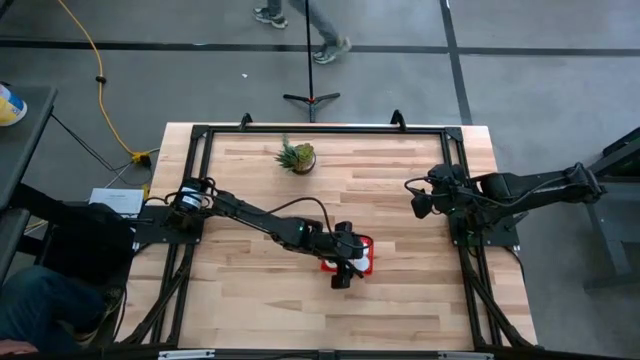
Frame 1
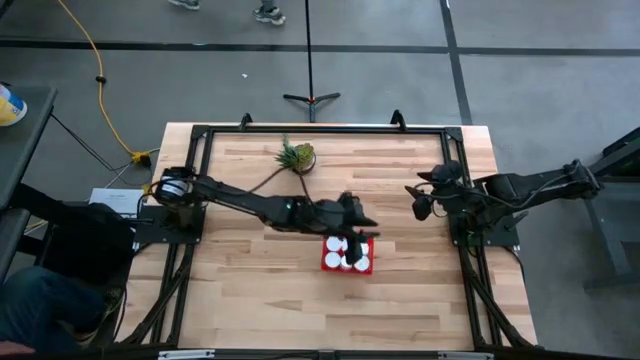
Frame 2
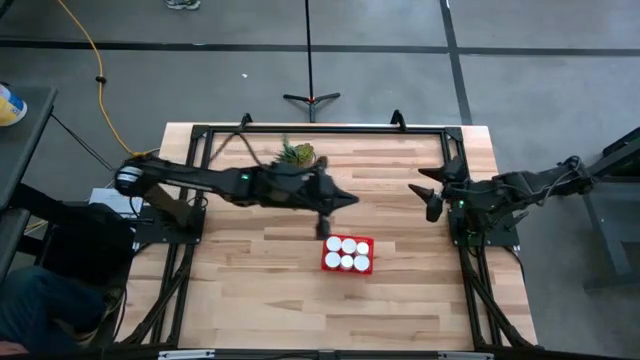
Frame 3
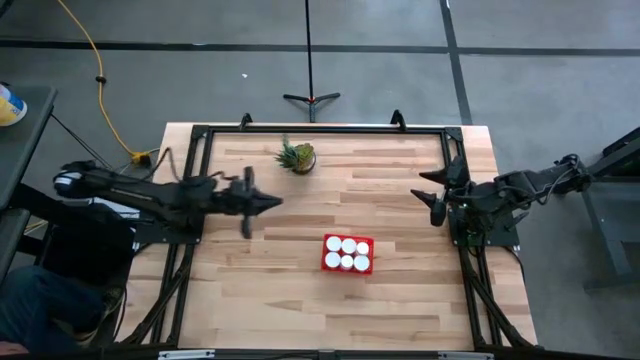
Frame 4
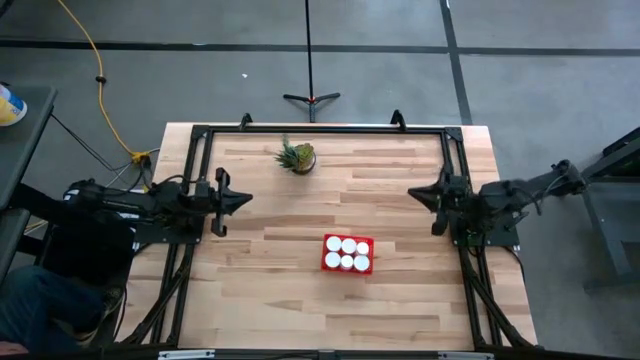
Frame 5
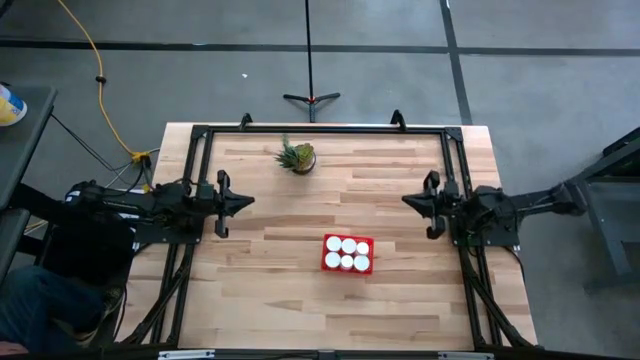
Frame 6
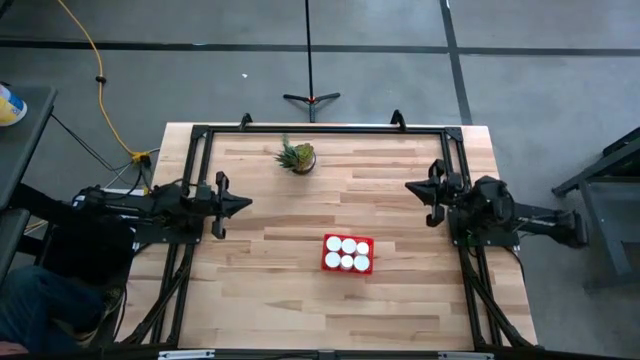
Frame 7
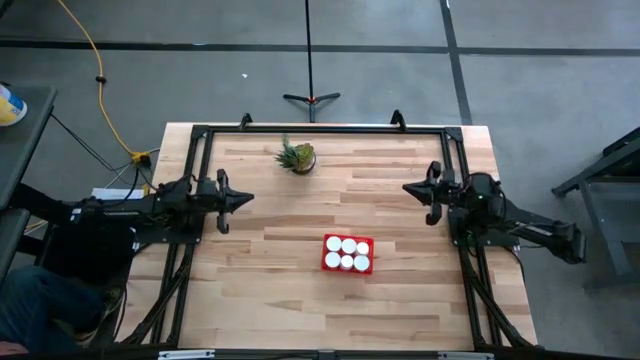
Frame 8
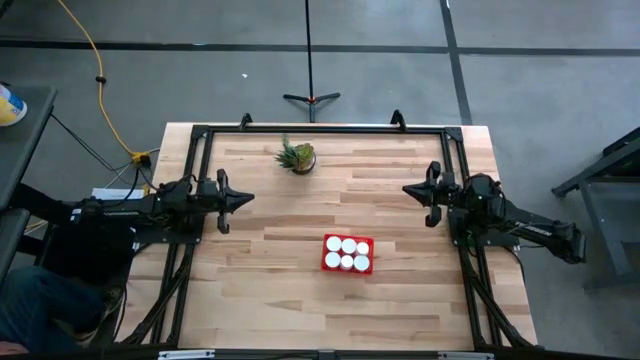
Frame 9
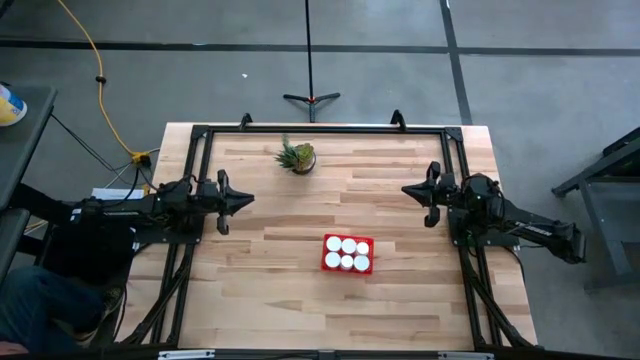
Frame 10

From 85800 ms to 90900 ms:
Task: Pick and place pill bottles into a basket
Return to Home Position

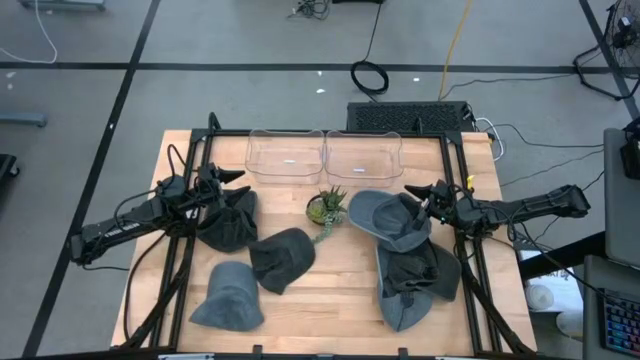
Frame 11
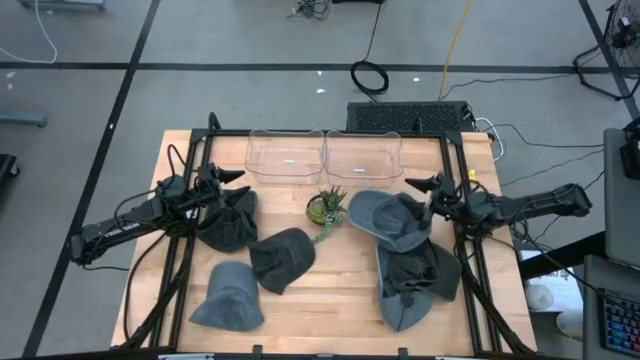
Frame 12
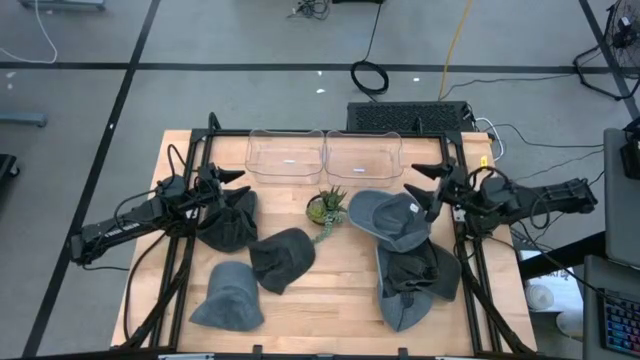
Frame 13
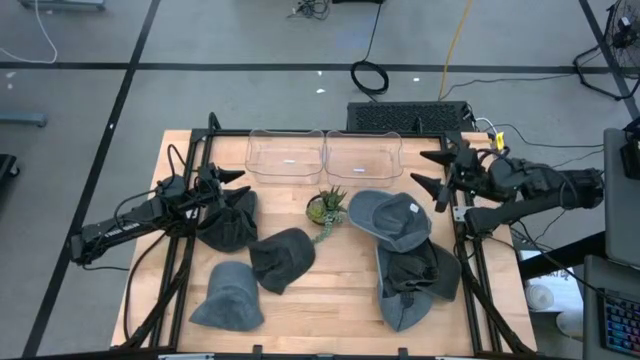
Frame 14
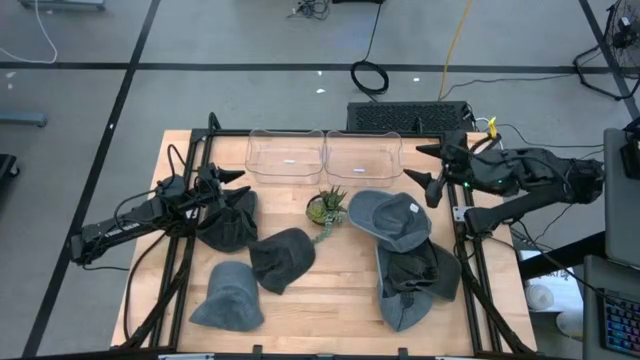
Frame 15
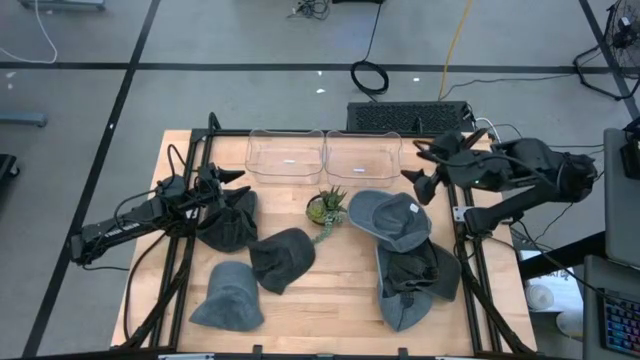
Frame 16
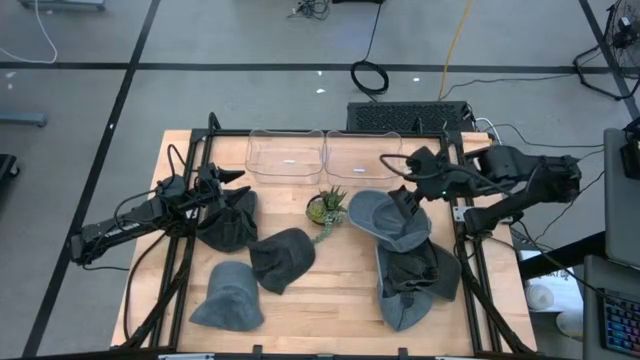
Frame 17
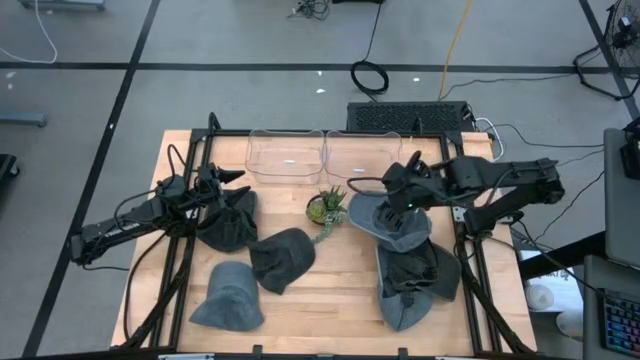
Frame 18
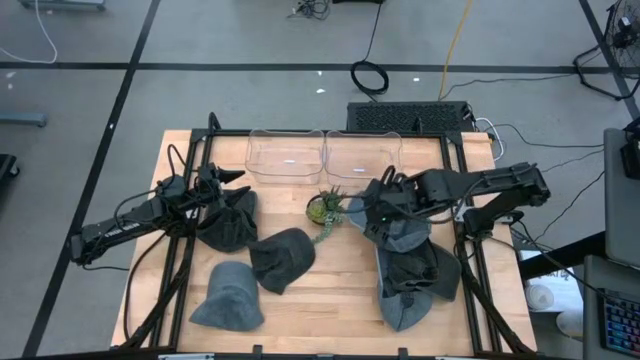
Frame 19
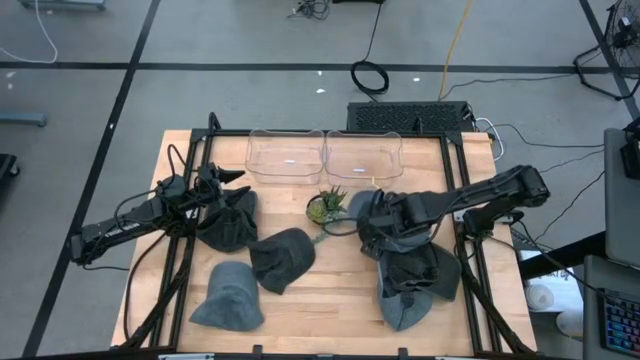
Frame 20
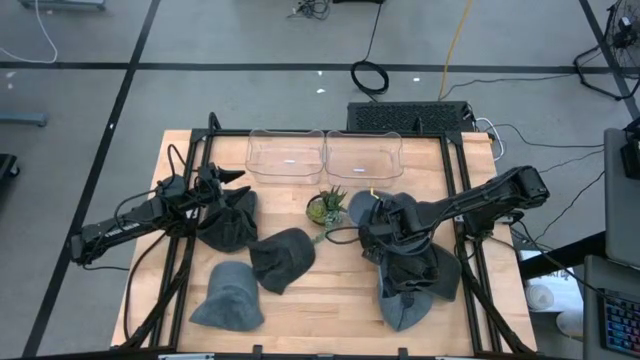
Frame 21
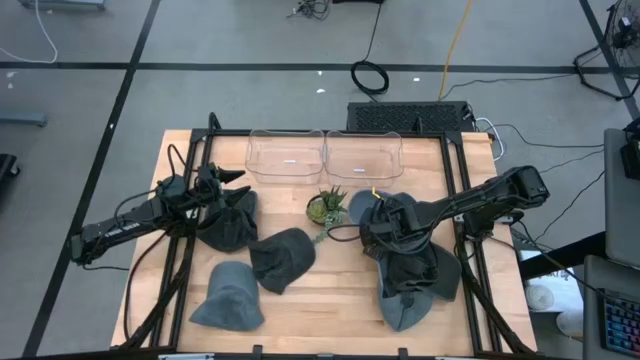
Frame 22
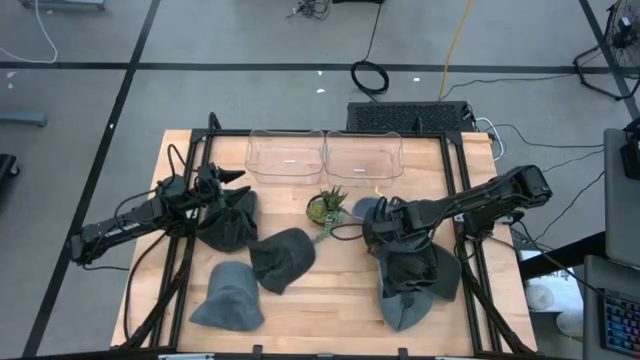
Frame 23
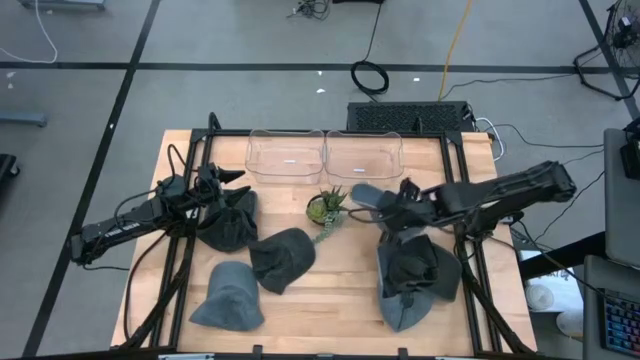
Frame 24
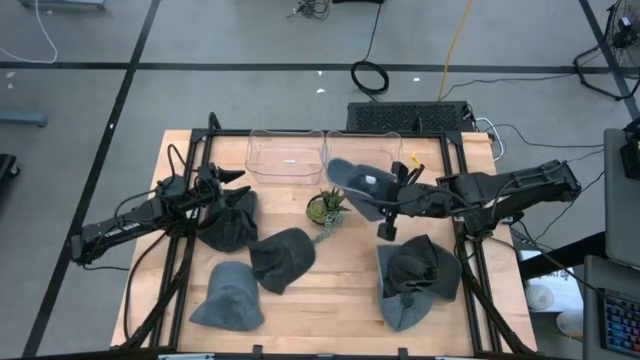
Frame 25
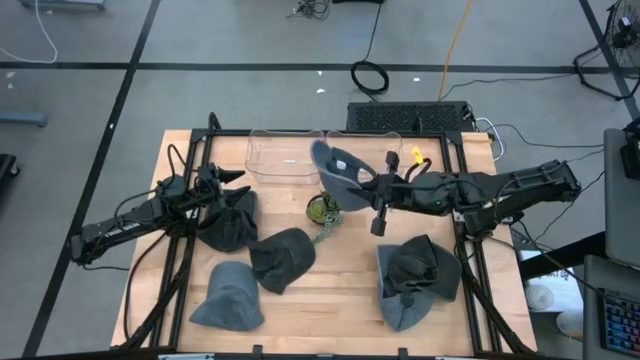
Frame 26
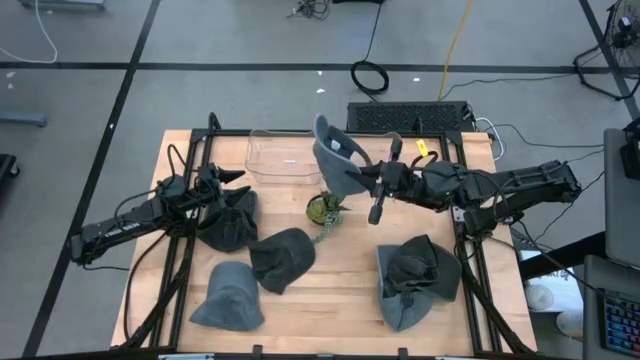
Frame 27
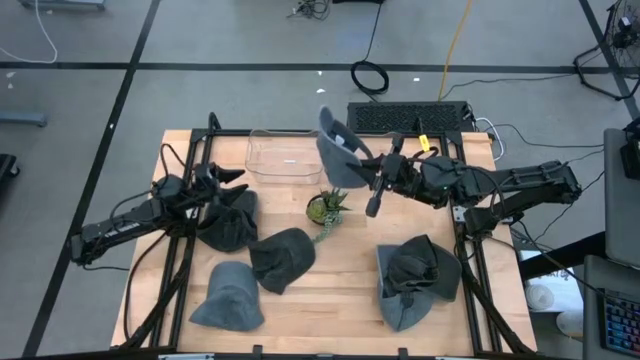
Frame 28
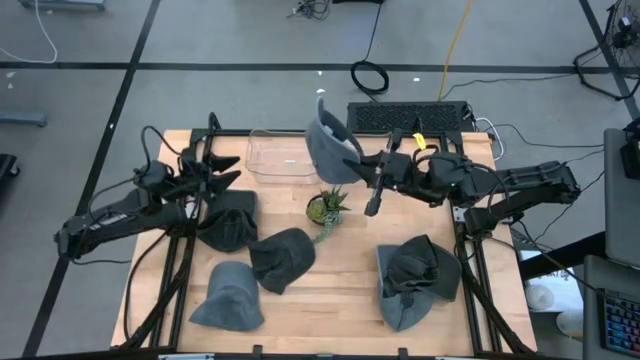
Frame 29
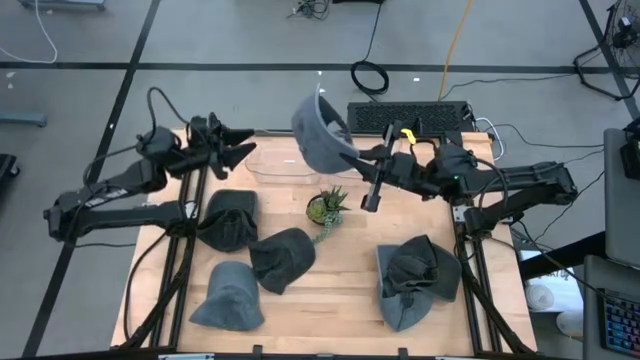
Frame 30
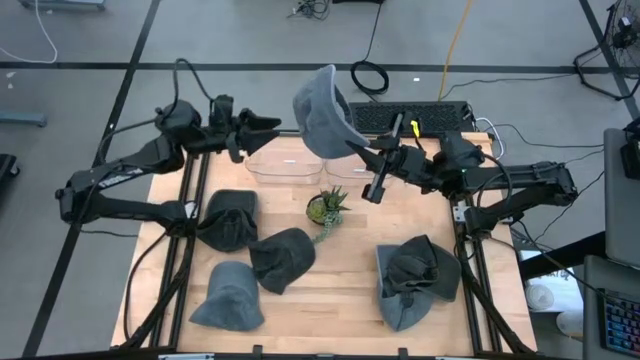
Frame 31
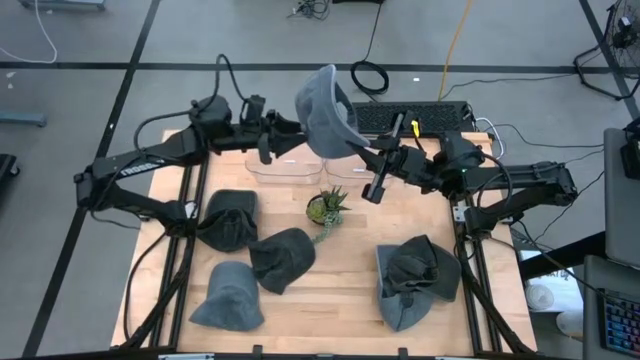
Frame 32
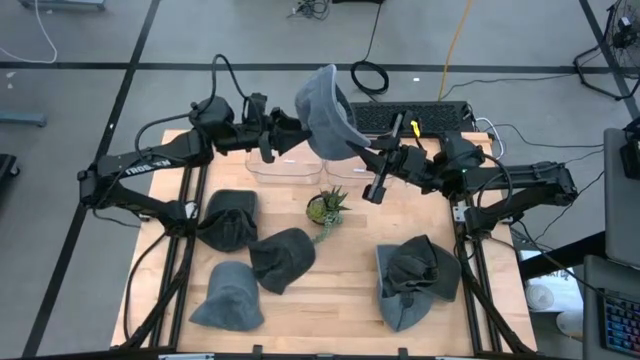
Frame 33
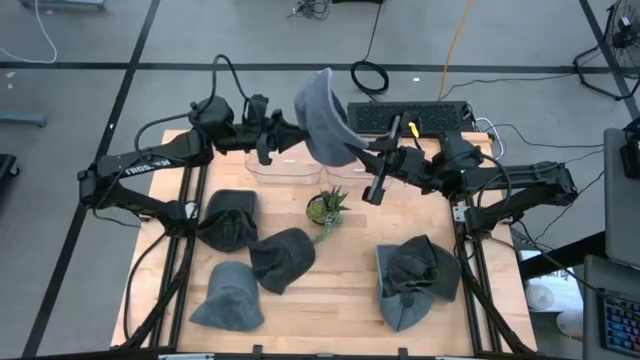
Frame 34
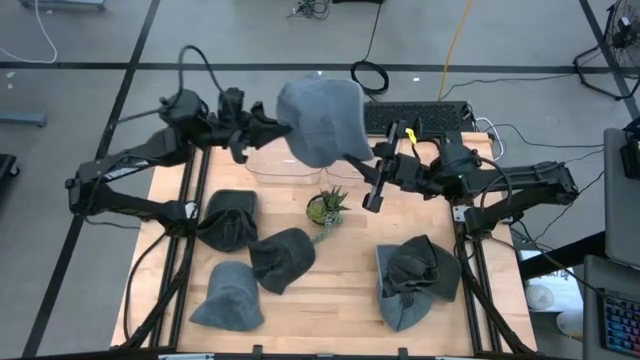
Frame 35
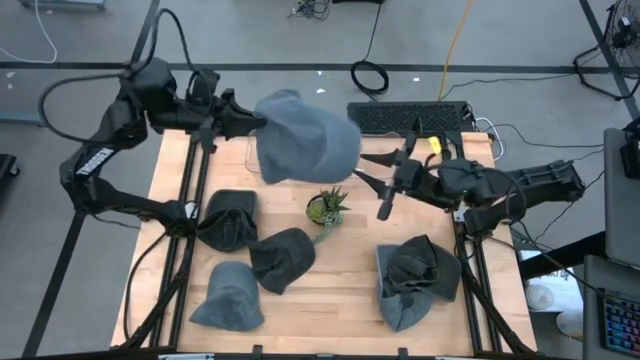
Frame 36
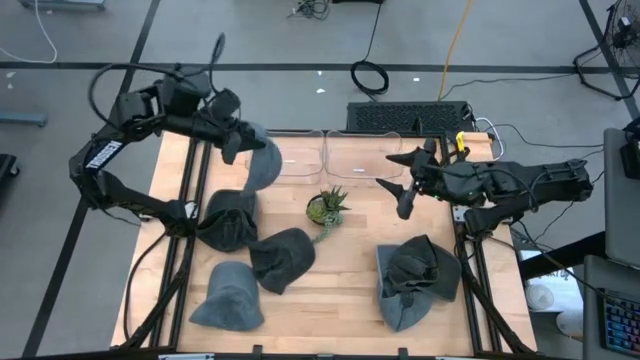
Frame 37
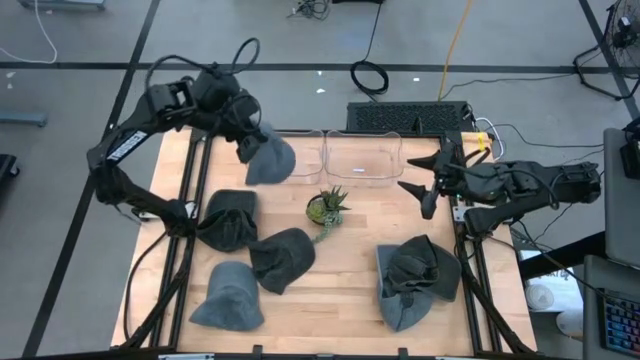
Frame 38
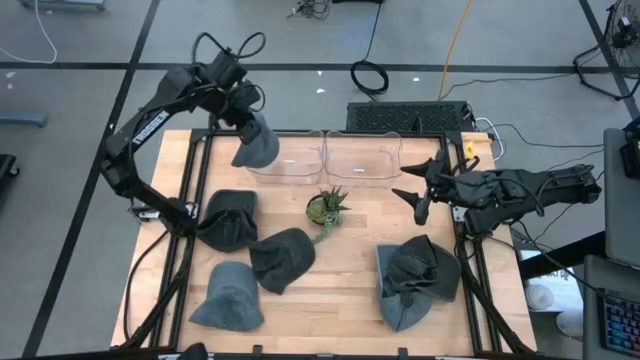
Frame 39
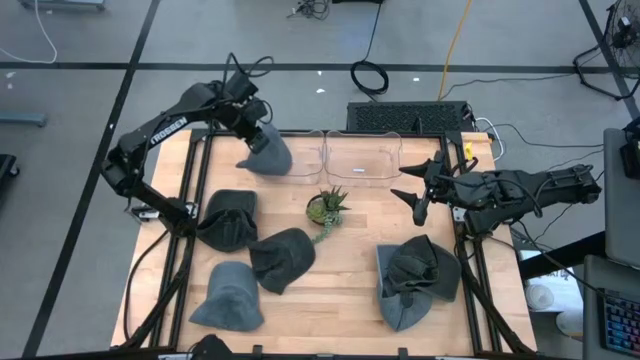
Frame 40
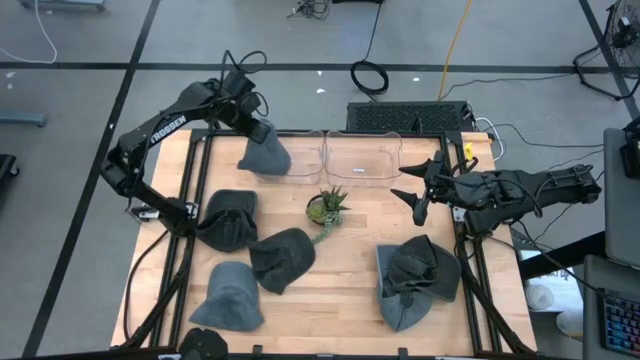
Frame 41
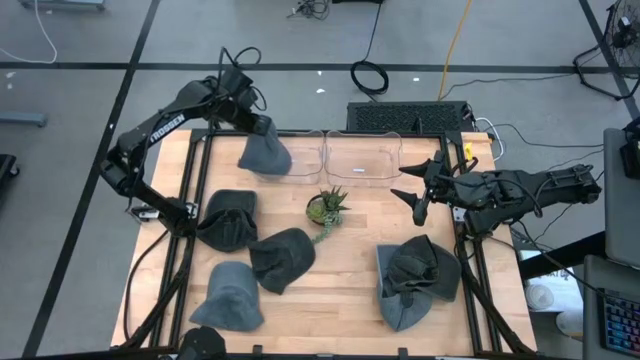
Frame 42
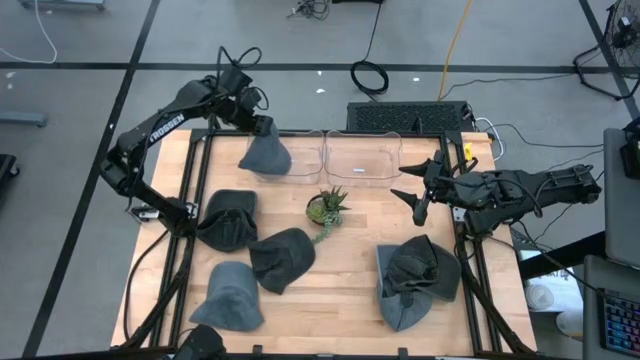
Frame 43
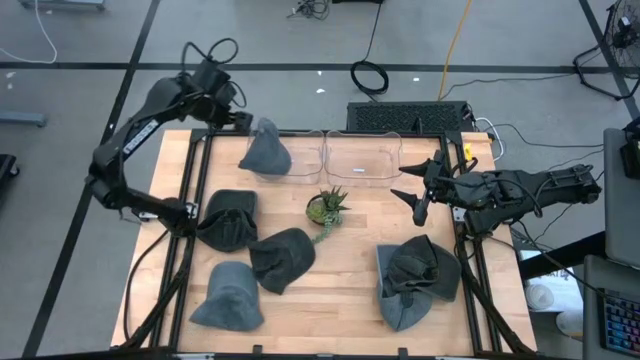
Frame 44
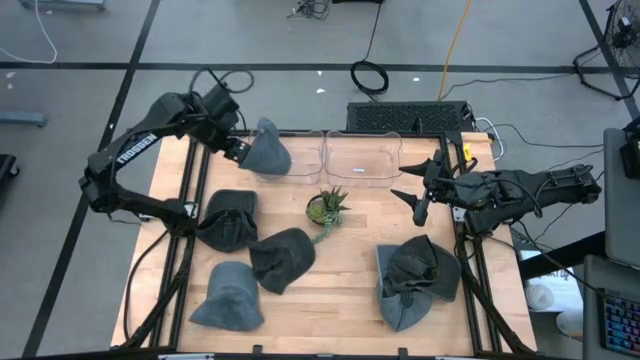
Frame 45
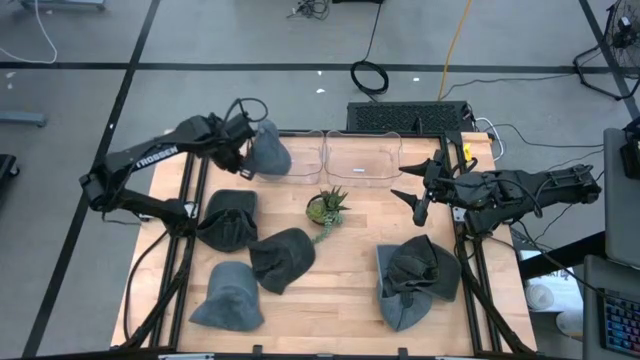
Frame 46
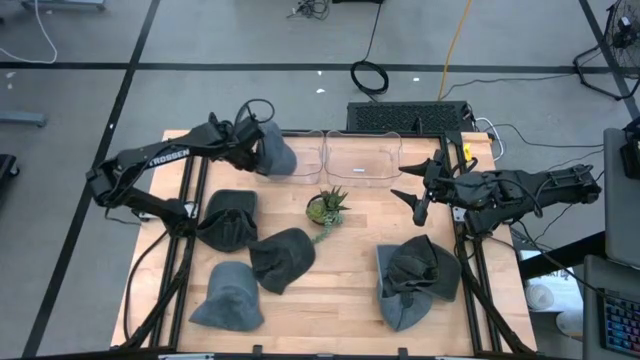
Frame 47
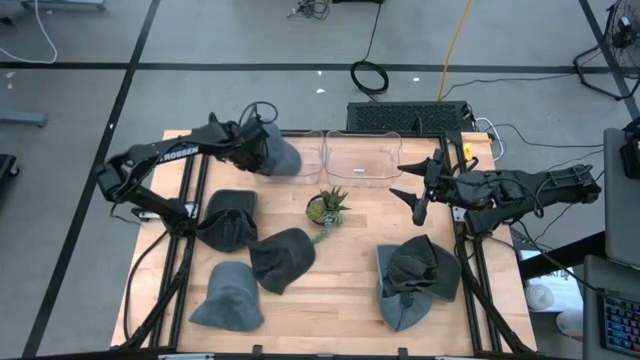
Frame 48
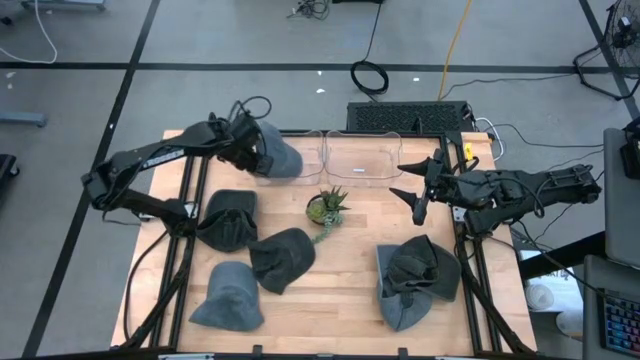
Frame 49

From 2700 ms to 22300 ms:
Task: Pick & Place hat
Put the top gray cap into the left transparent bin
